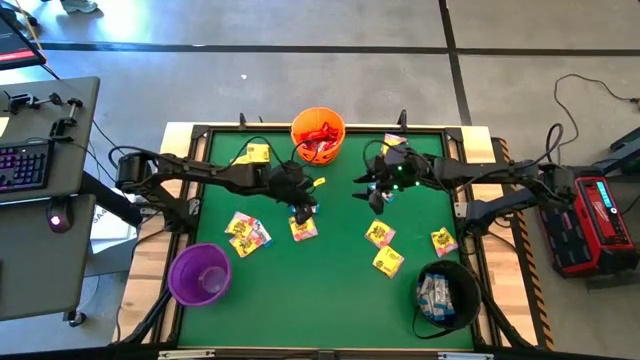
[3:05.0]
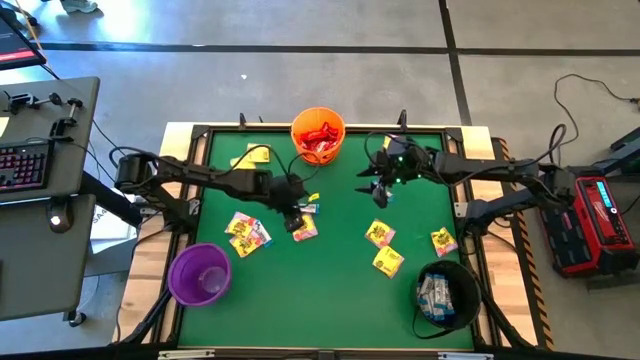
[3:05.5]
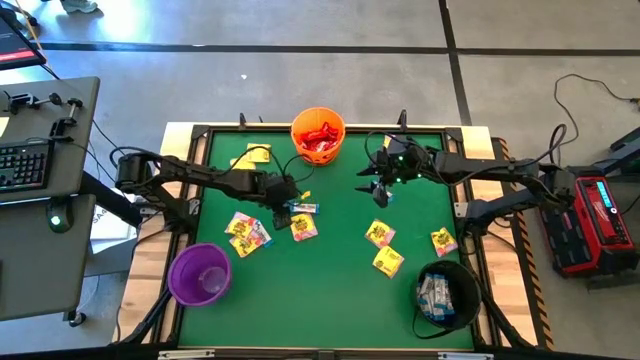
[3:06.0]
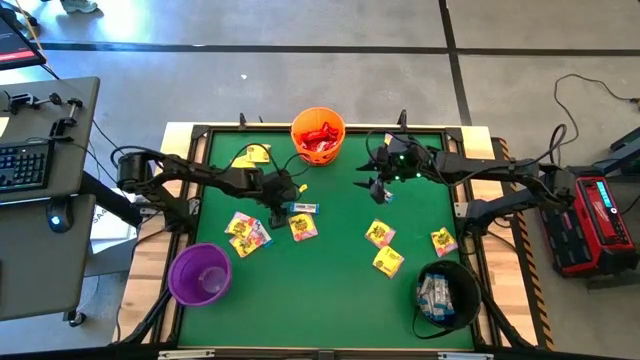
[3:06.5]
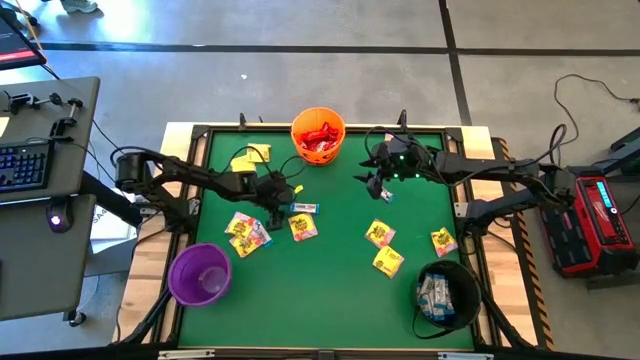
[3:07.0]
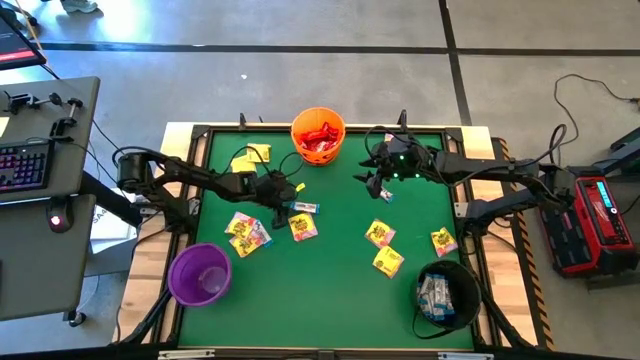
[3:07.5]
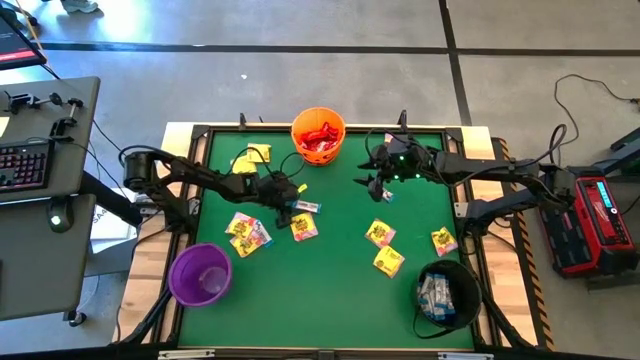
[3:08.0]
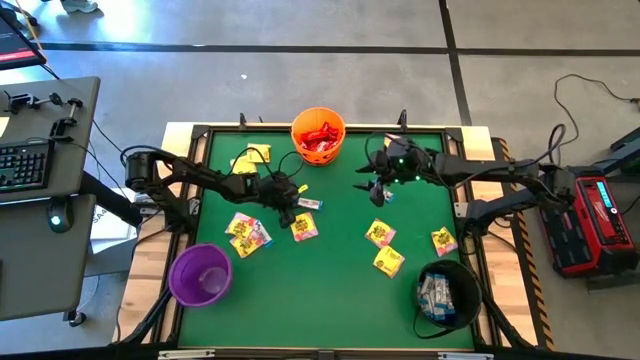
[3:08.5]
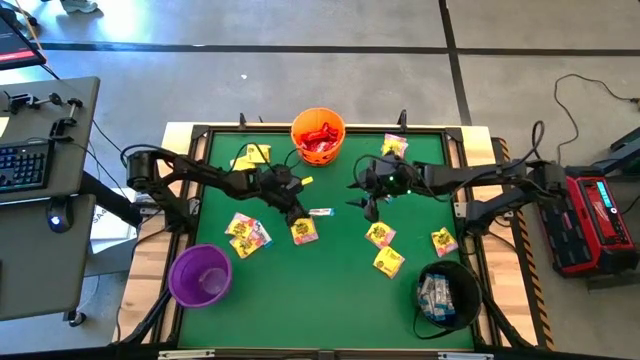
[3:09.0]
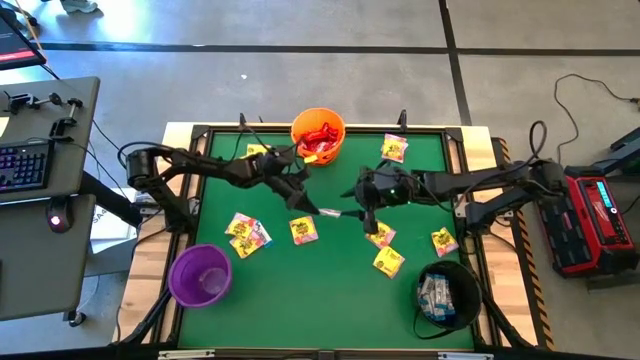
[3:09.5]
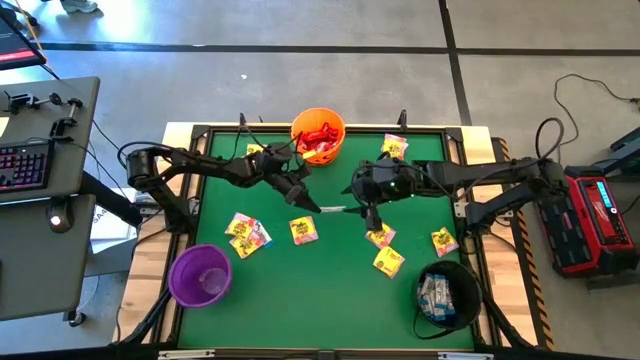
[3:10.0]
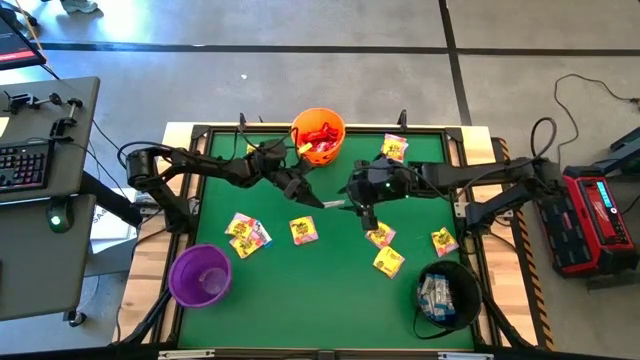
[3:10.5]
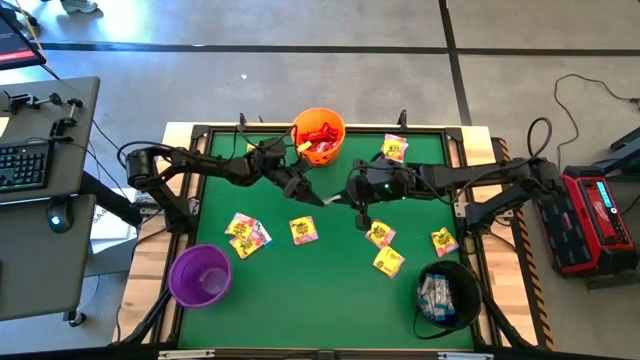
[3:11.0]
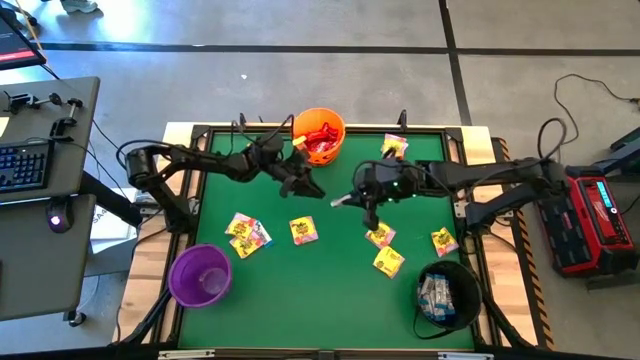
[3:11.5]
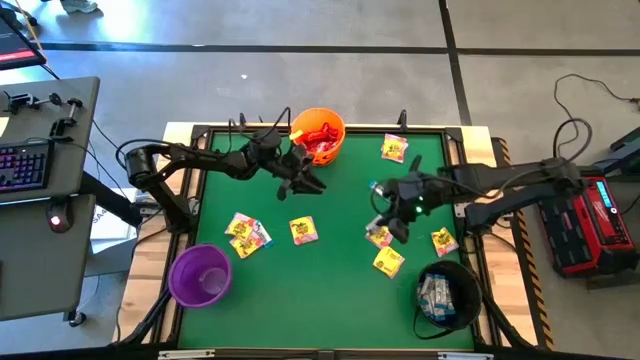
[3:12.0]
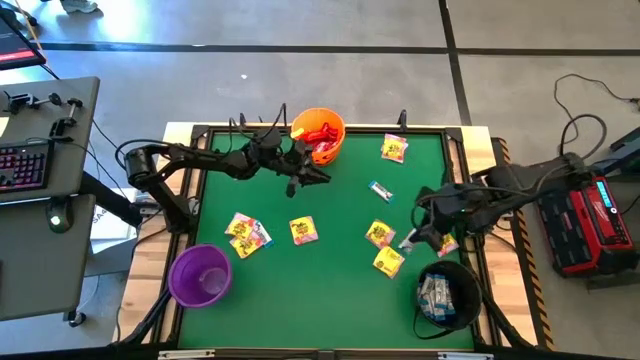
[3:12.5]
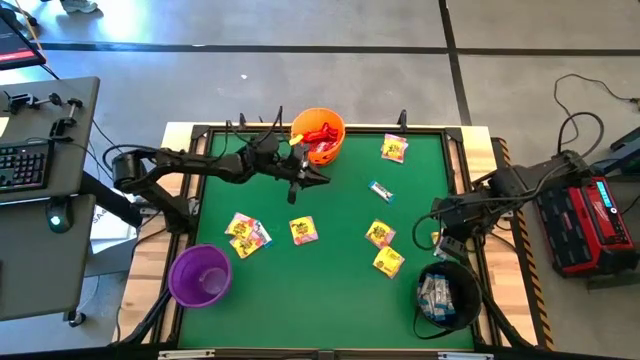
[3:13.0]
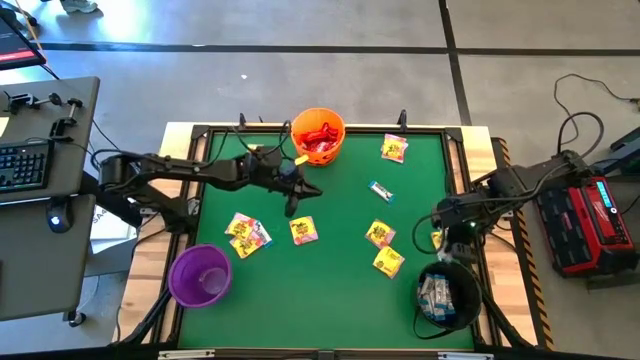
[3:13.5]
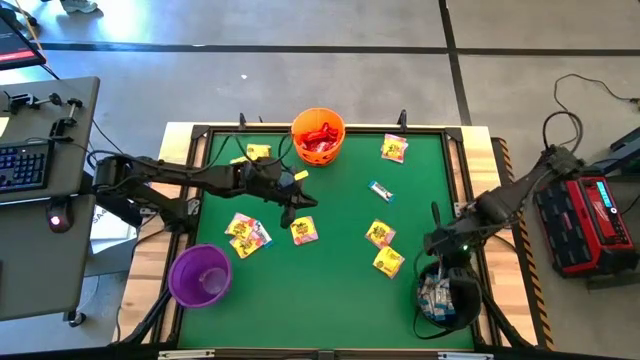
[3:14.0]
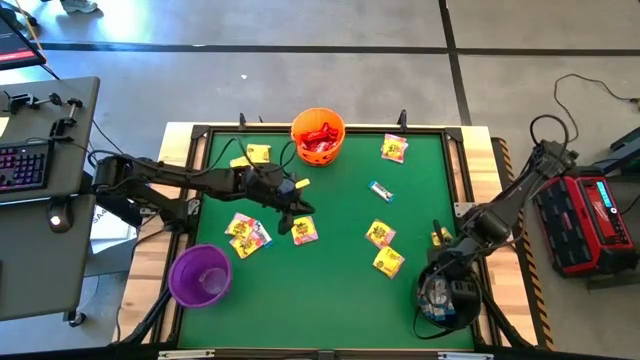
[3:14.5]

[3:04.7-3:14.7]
Task: Sort candy by brand, put in halloween buckets
Put the white chocolate bar into the black bucket

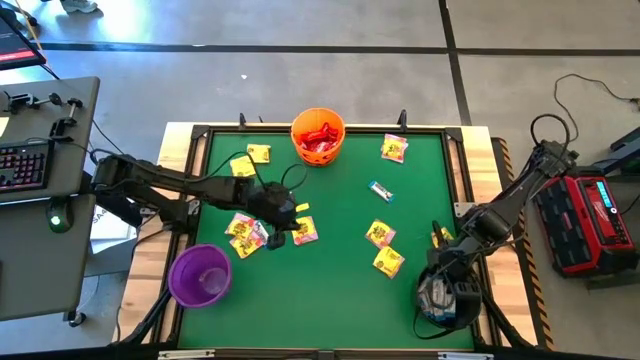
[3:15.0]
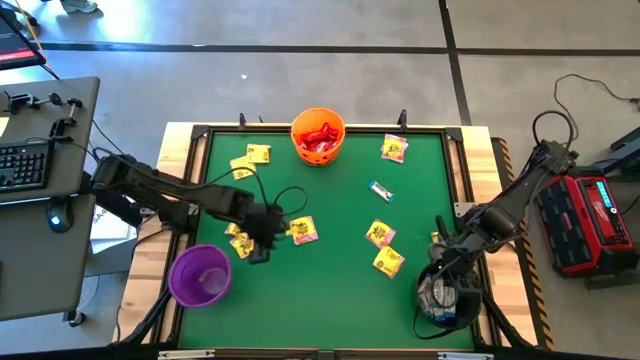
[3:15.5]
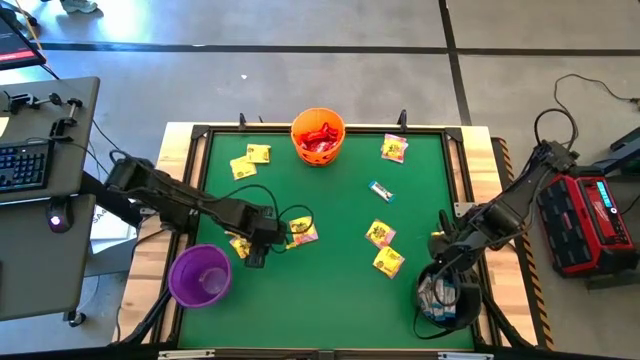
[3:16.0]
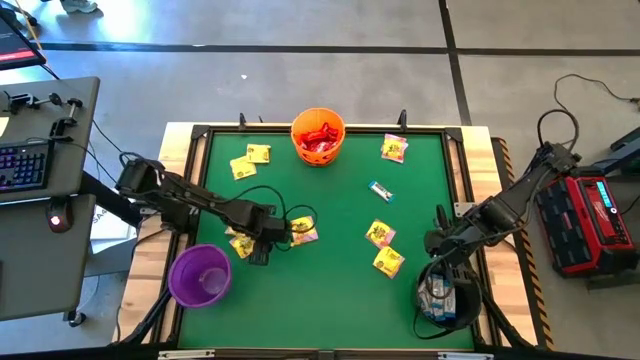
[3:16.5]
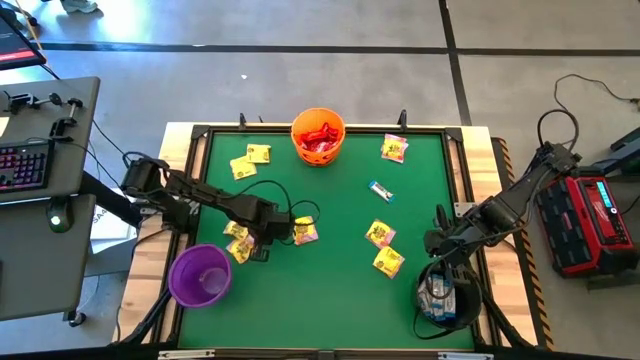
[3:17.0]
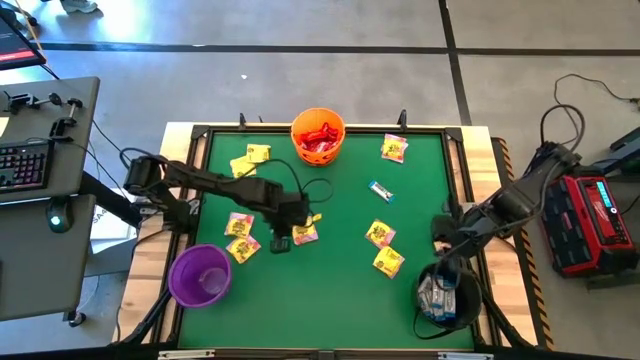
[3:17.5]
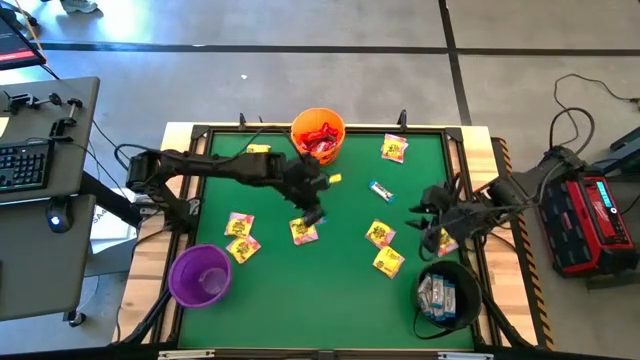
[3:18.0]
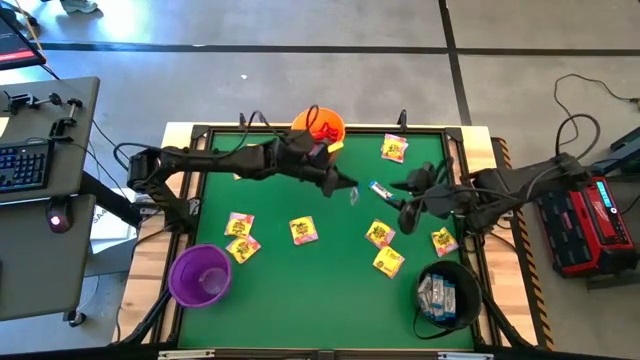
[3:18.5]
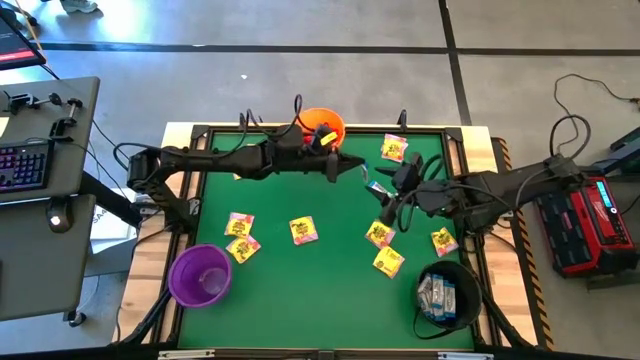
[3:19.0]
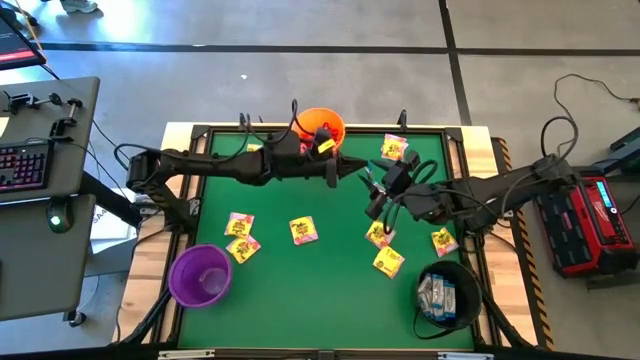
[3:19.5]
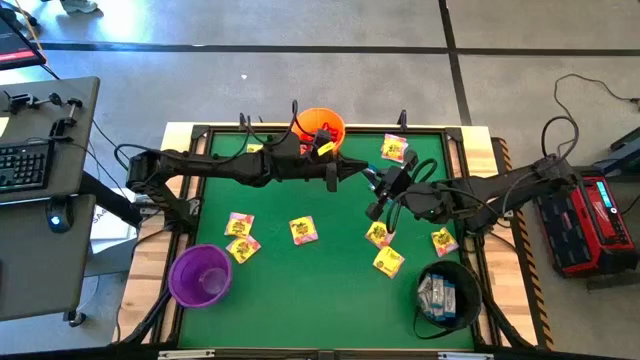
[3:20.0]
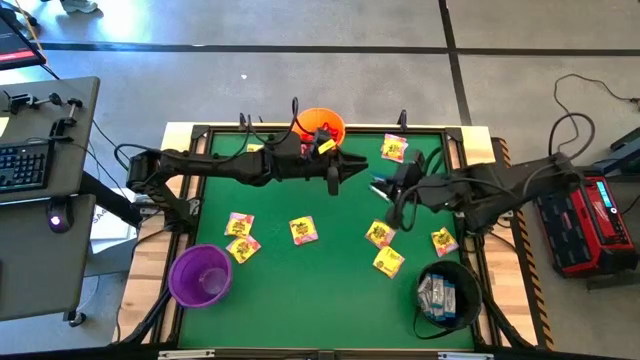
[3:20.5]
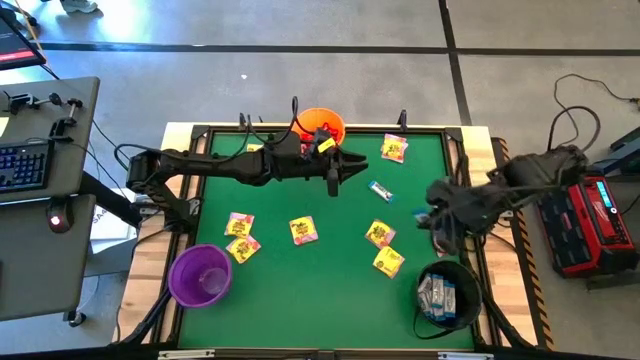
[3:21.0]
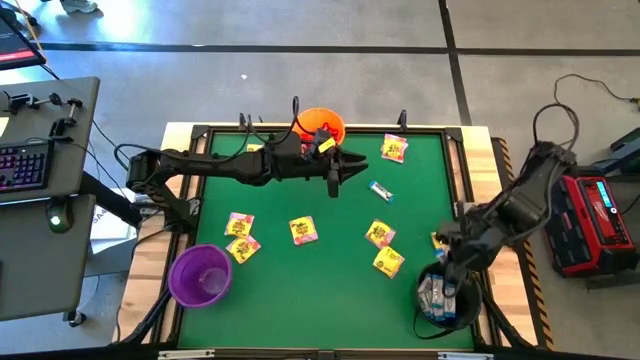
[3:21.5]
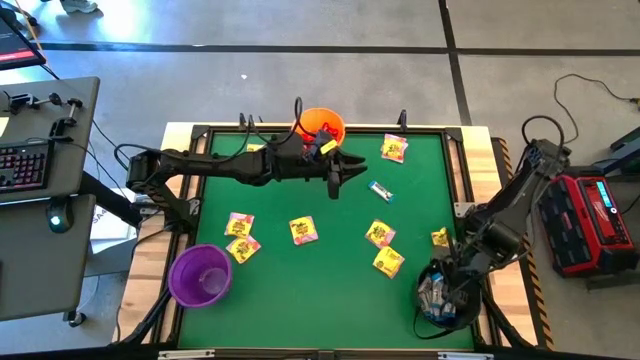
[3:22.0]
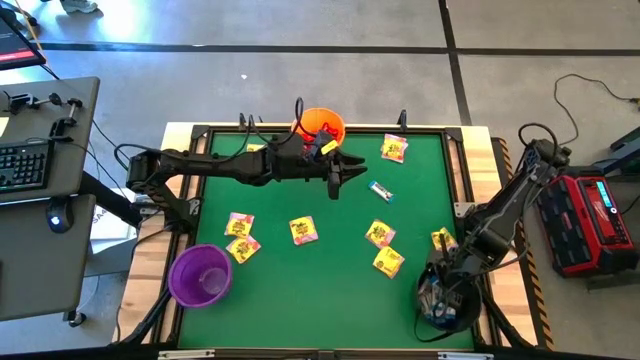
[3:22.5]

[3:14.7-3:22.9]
Put the white chocolate bar into the black bucket

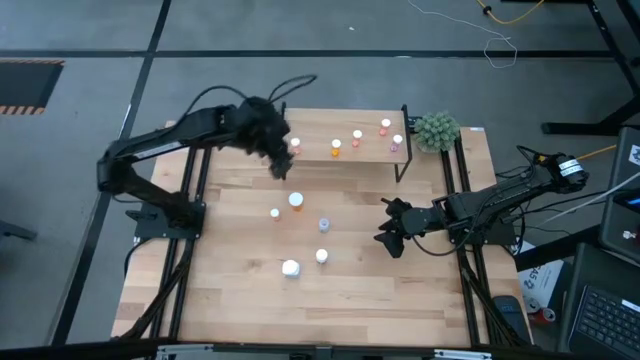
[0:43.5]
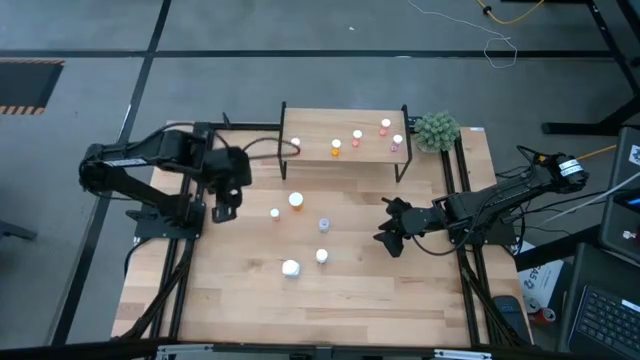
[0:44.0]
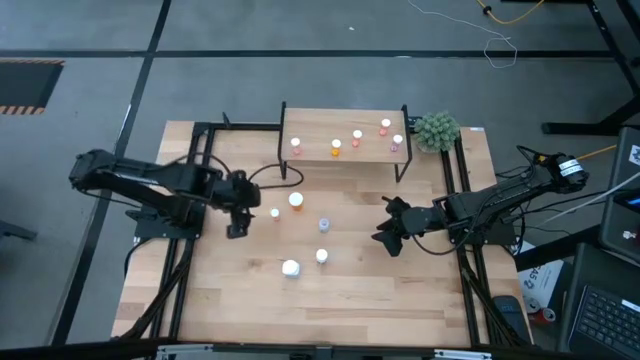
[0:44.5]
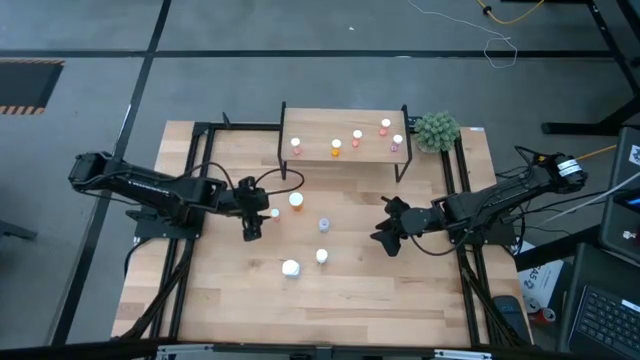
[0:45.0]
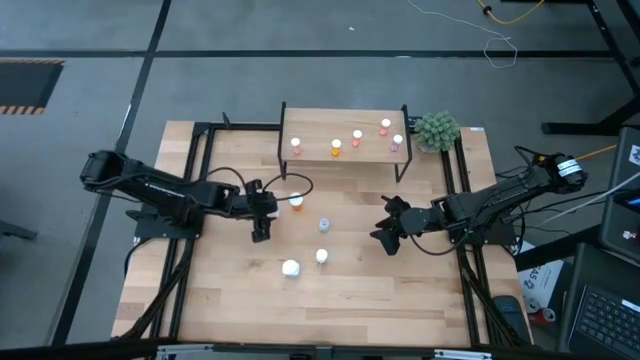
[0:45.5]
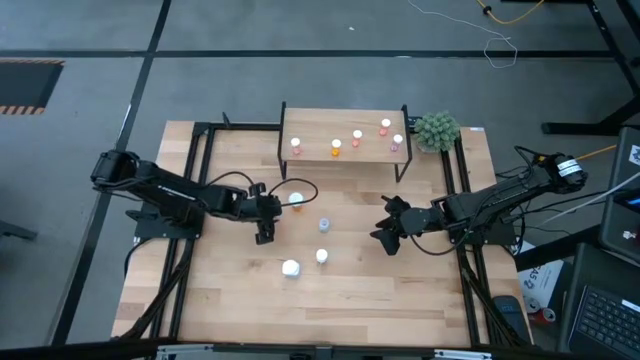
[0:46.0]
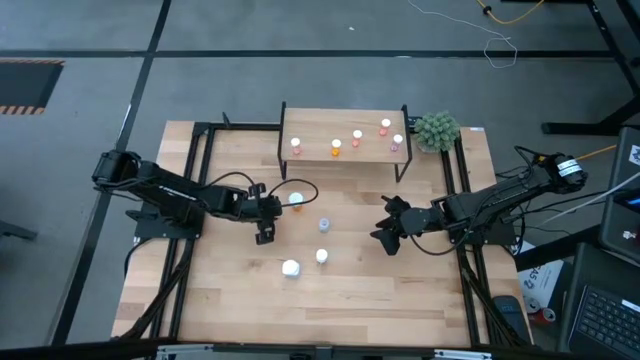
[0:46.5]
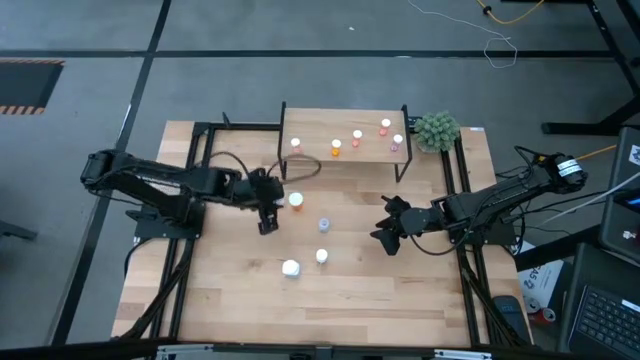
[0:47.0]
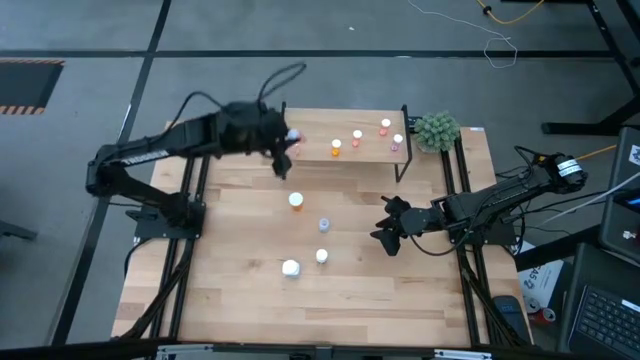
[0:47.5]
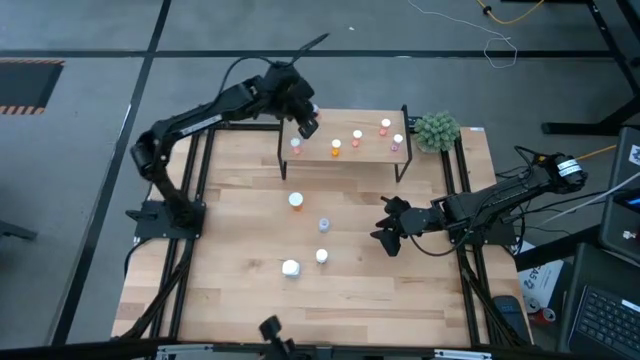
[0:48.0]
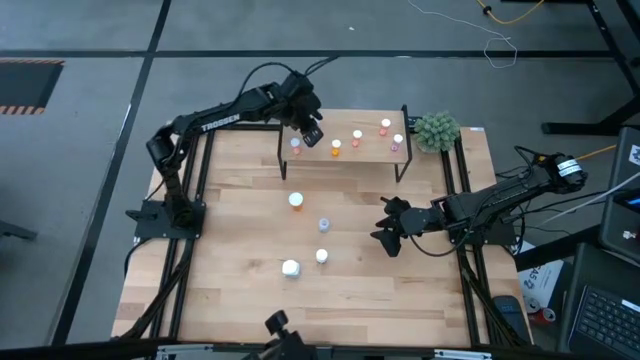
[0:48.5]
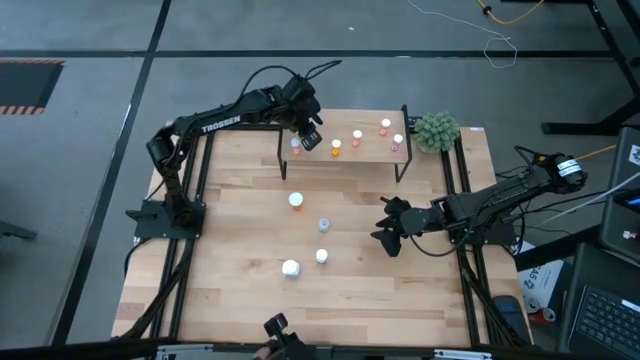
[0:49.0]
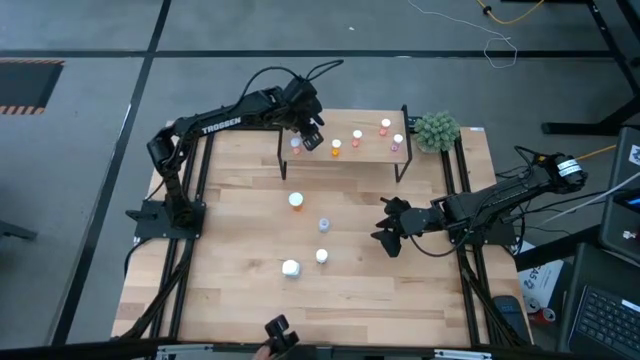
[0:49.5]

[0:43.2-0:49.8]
Task: Pick and place medicine bottles onto shelf by color
Put the orange pill bottle on the shelf
